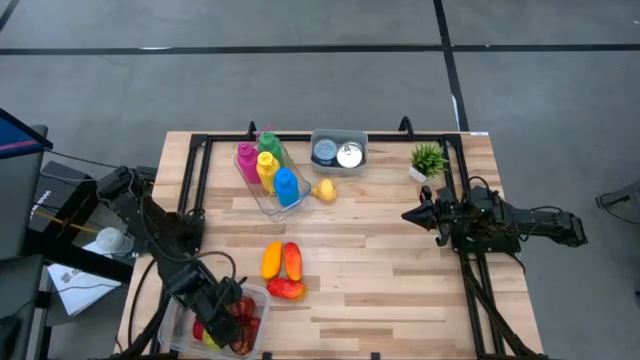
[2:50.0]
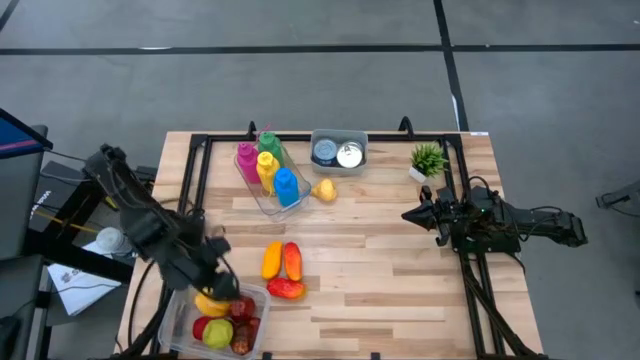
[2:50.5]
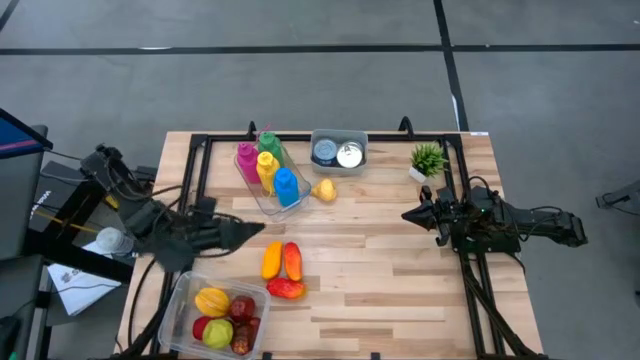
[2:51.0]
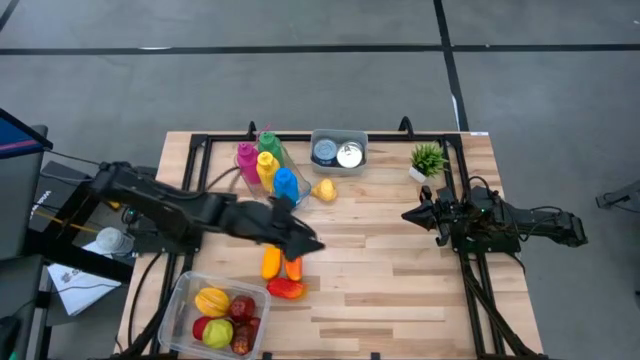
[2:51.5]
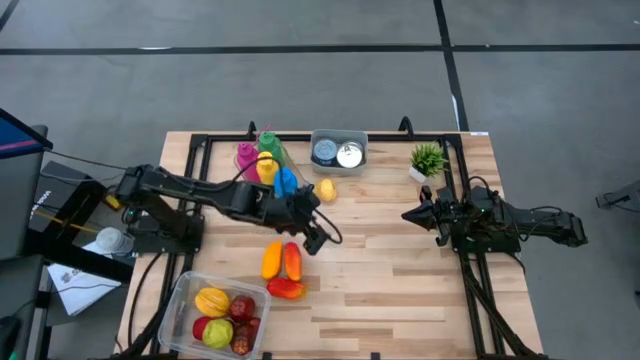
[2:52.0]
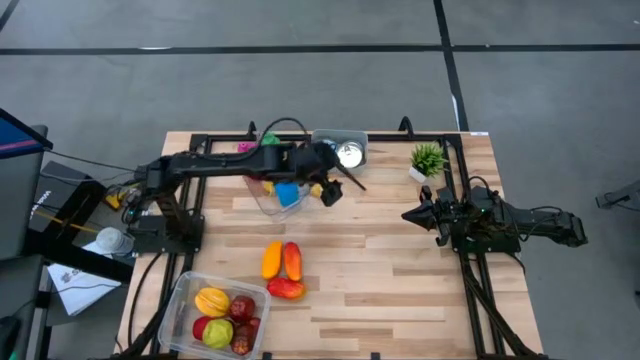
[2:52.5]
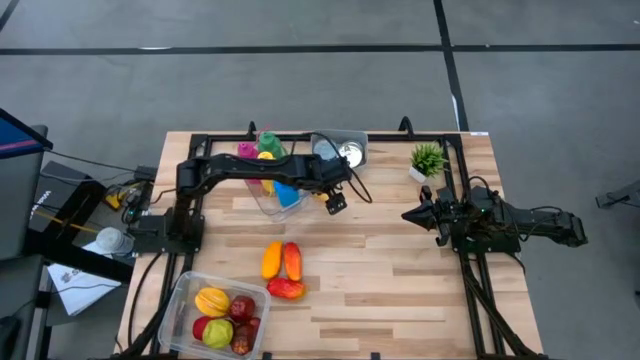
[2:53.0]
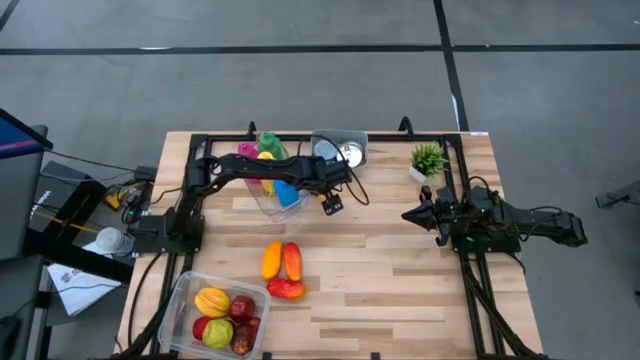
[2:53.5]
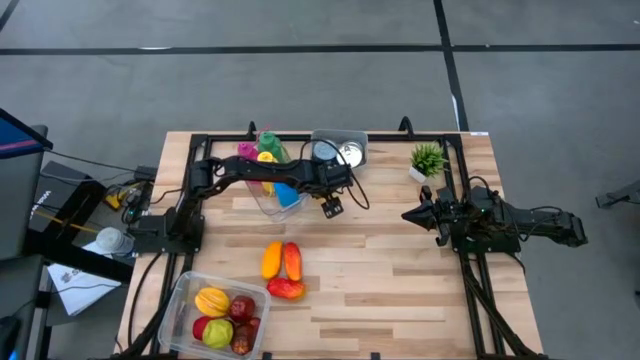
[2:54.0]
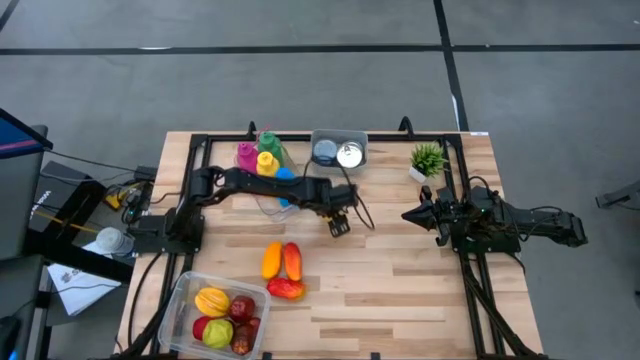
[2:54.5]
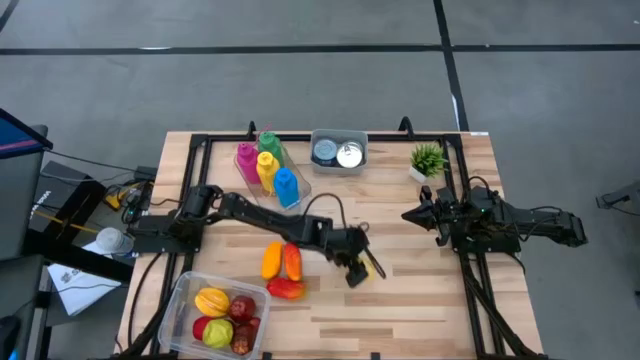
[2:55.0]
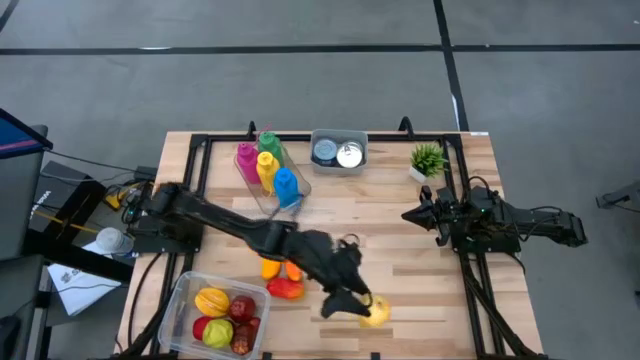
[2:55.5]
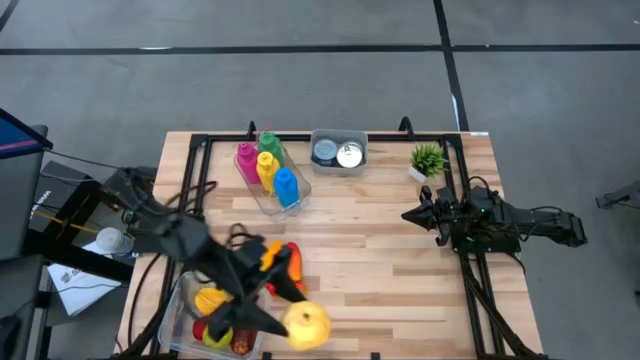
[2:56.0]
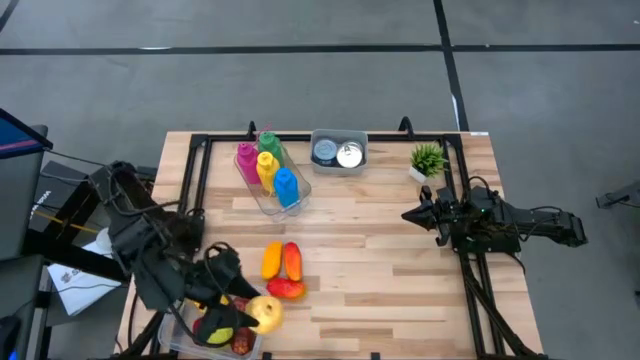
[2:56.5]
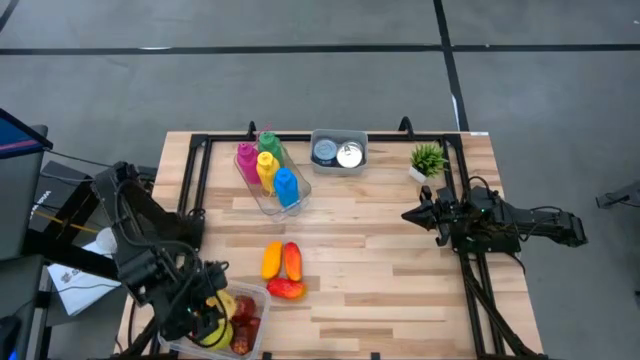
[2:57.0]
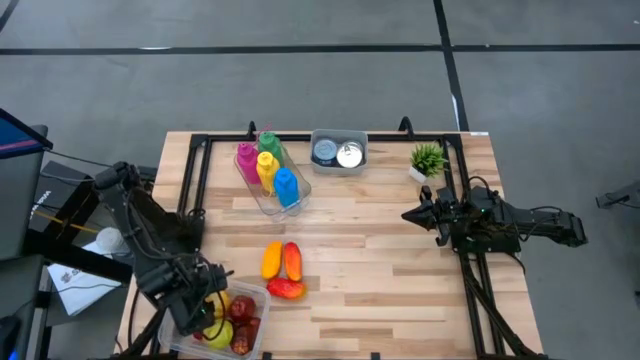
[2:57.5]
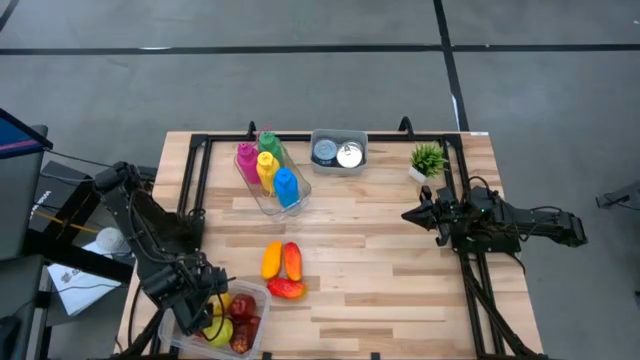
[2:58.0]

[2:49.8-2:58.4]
Task: Pick & Place Food Item
Put the yellow pear into the white bin

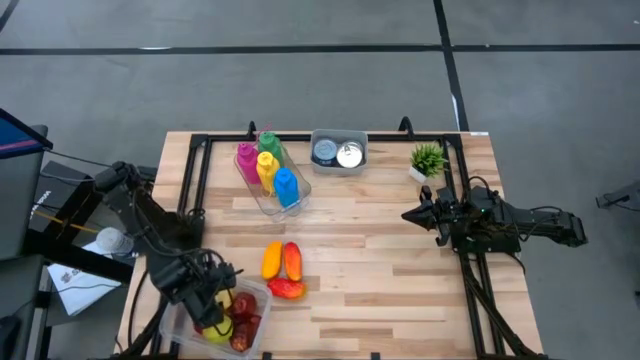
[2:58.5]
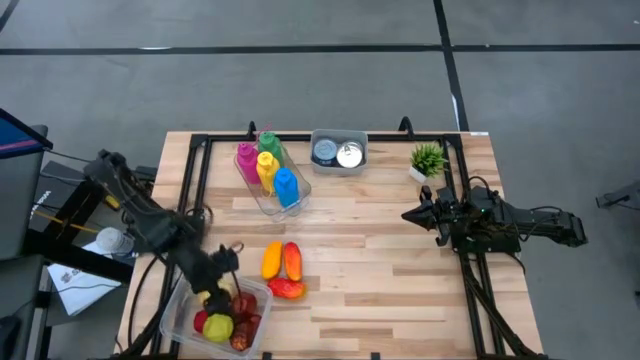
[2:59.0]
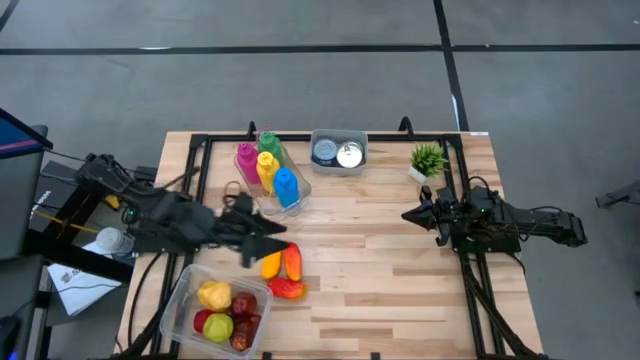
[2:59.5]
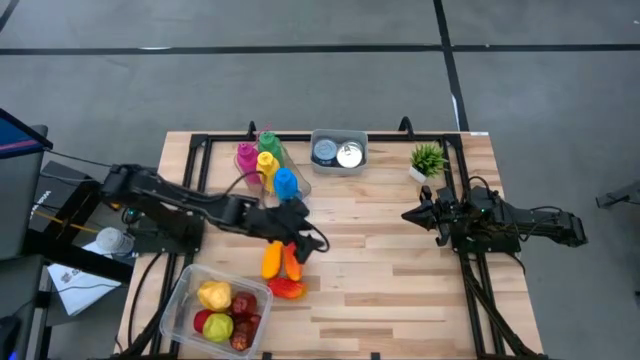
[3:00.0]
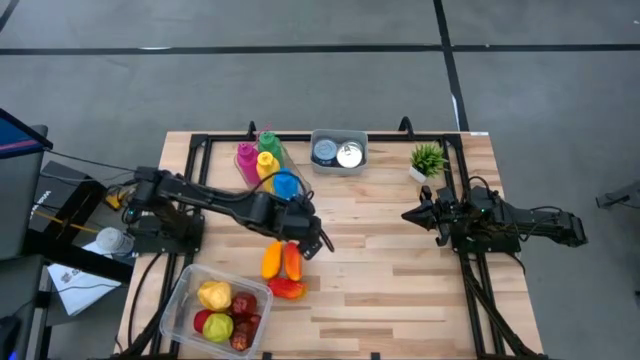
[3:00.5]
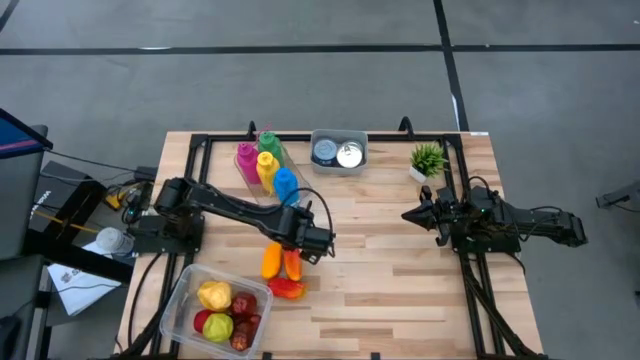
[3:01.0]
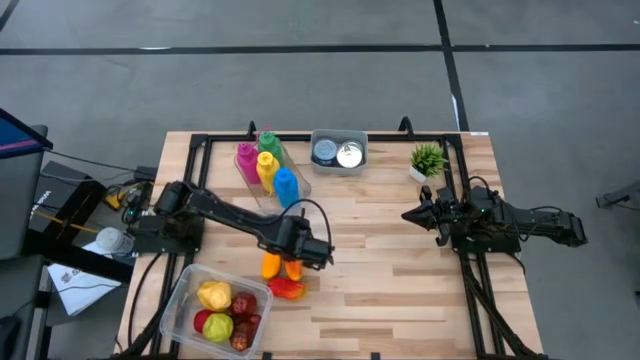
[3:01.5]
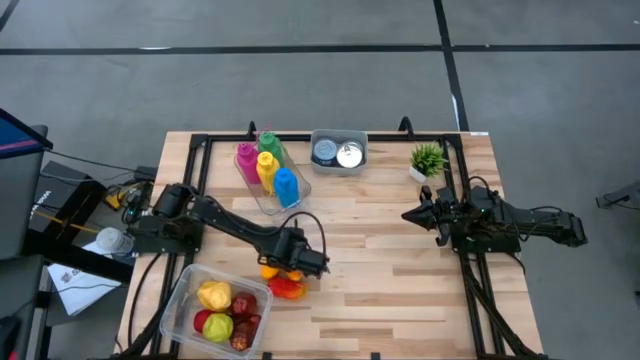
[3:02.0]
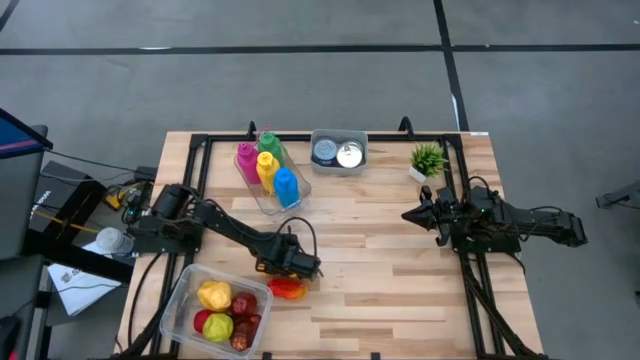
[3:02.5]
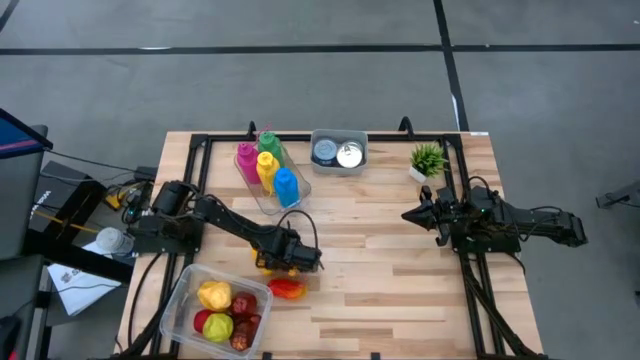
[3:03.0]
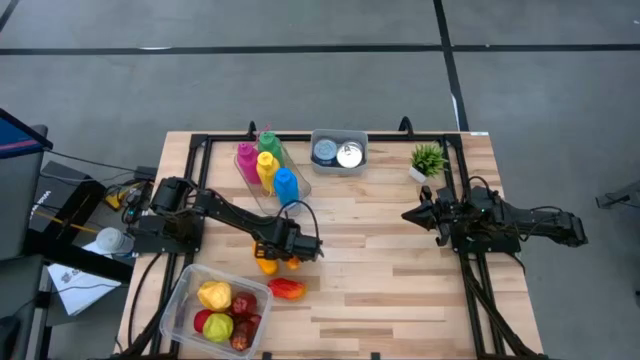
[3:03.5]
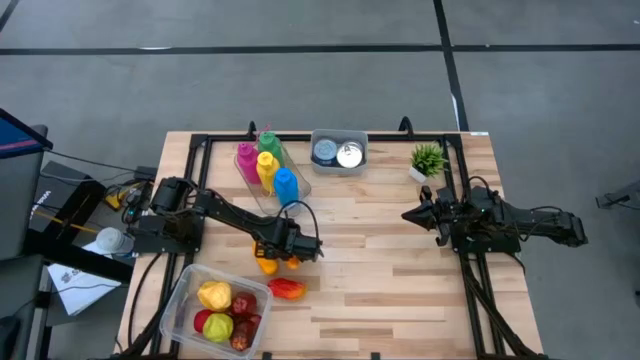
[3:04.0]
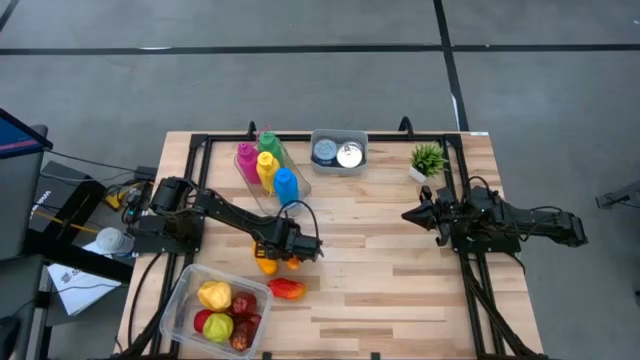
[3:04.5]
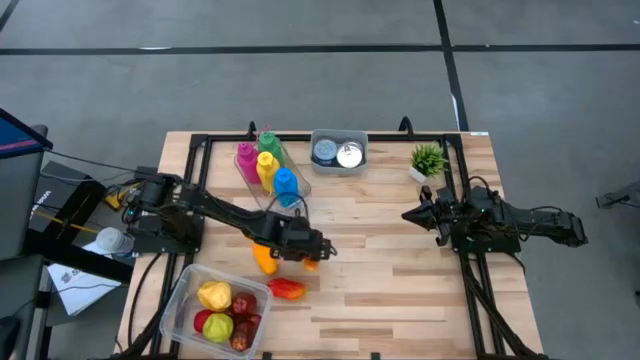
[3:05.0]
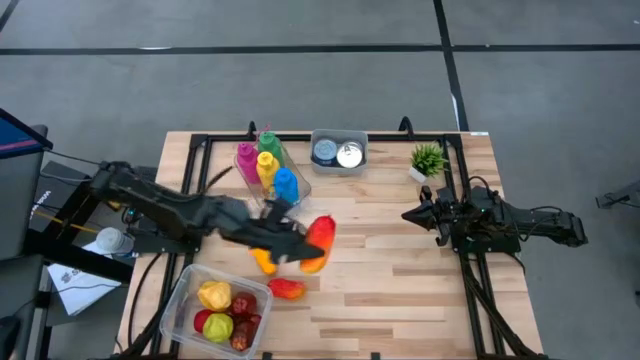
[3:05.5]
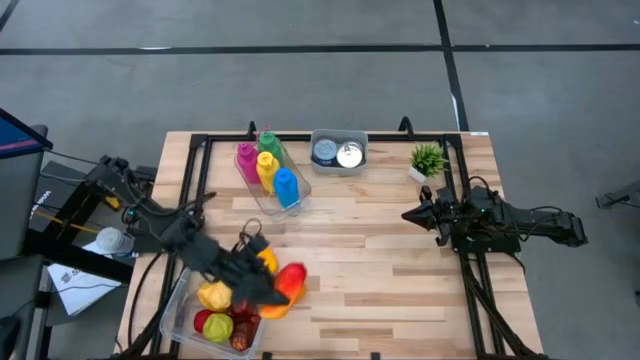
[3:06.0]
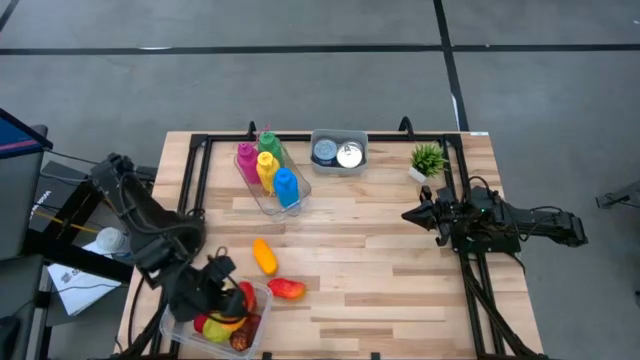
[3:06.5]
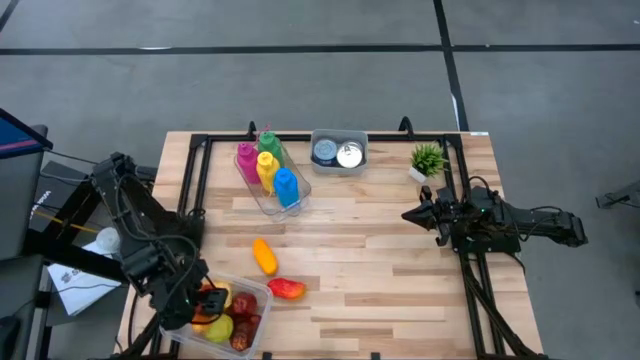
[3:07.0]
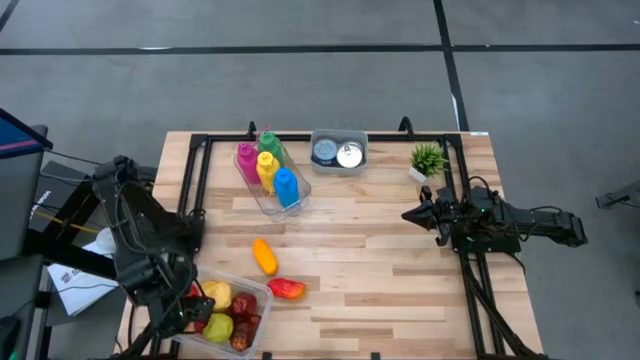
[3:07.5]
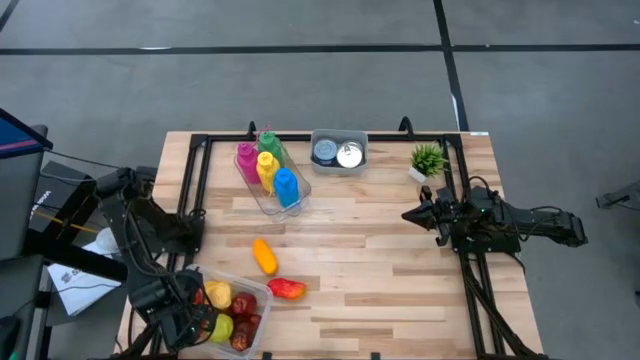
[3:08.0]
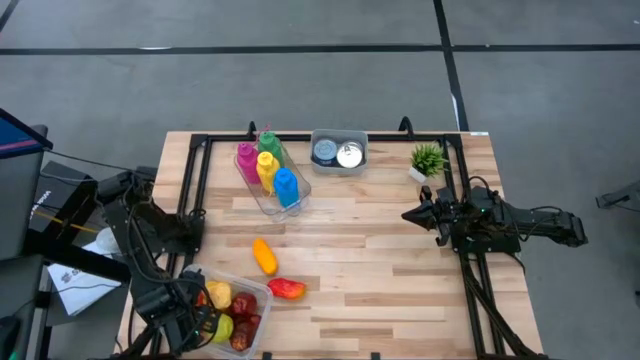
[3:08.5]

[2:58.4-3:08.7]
Put the top red mango into the white bin

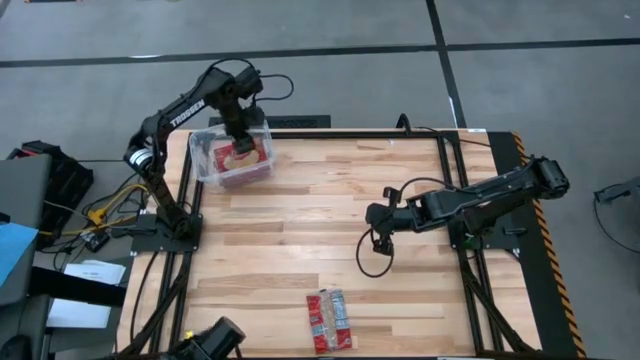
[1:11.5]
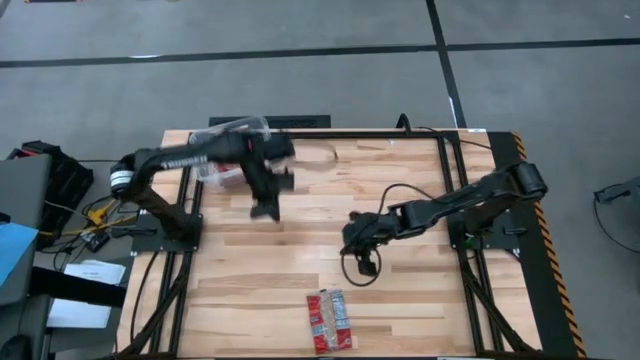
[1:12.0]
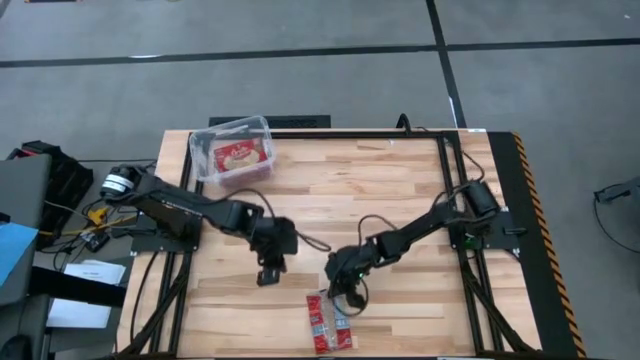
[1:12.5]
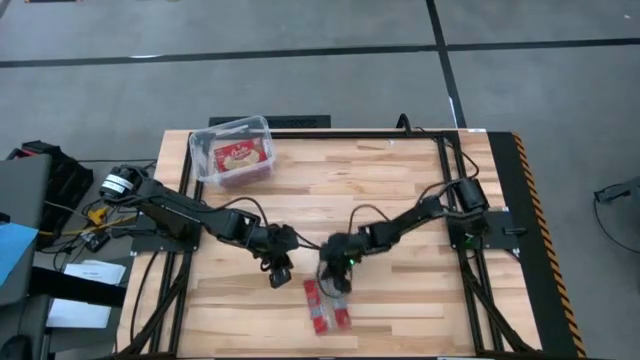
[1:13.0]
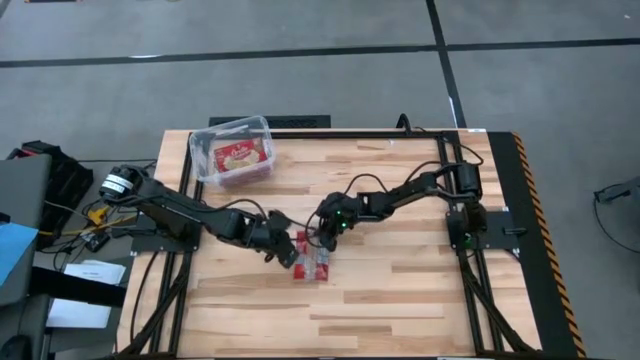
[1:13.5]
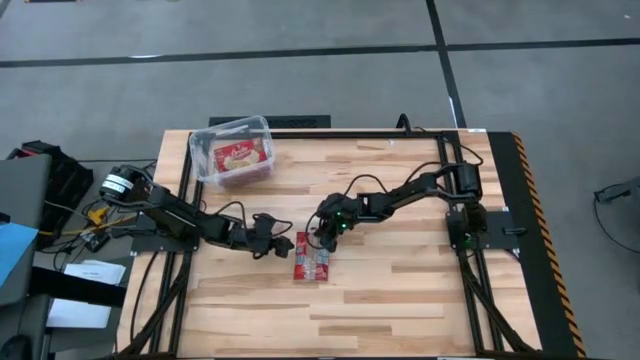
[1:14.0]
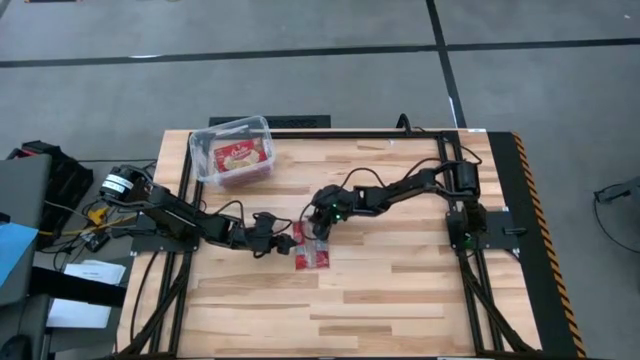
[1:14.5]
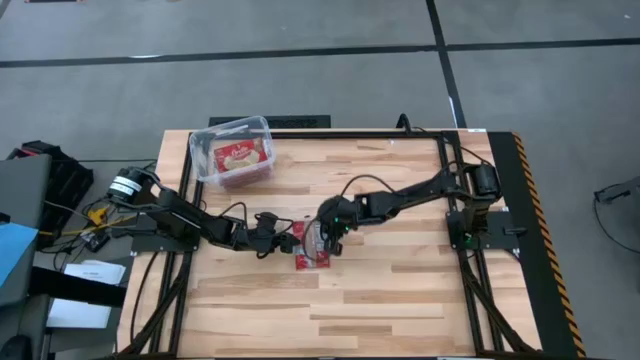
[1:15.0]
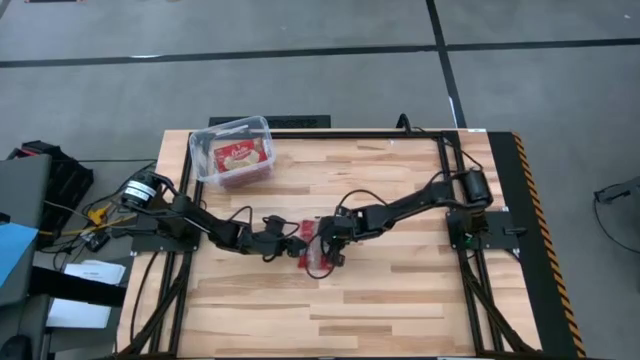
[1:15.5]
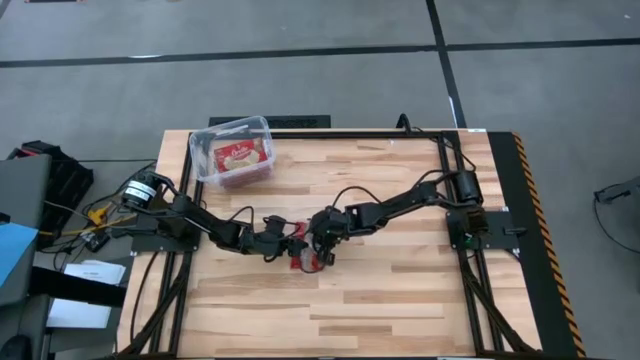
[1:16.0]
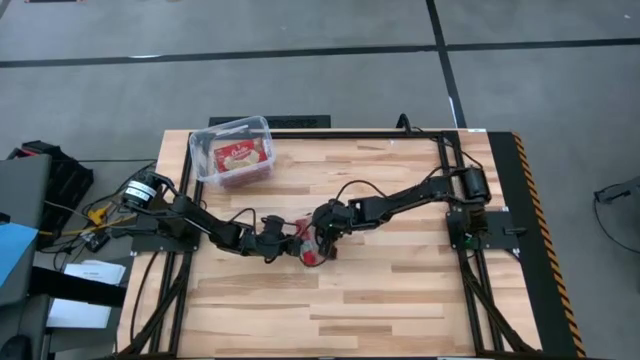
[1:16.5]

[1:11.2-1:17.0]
Task: Sort popcorn bags into baskets
Put the red popcorn bag into the transparent bin
